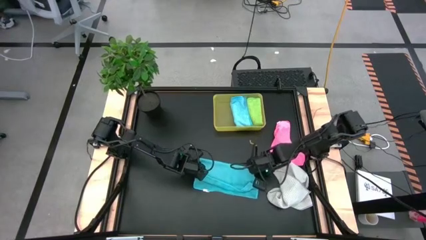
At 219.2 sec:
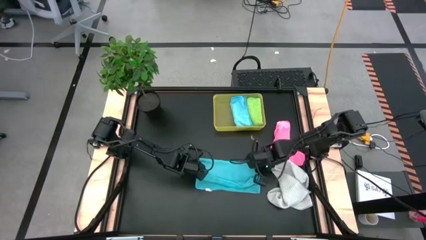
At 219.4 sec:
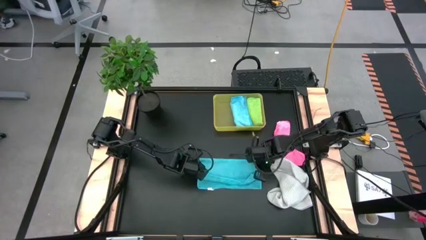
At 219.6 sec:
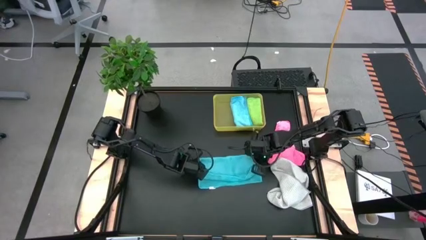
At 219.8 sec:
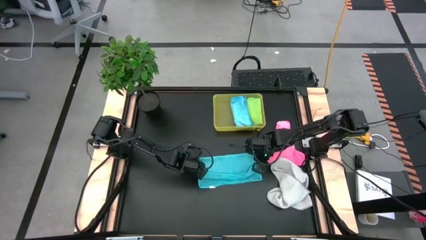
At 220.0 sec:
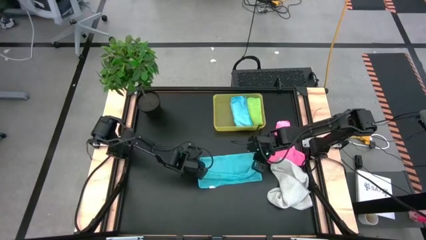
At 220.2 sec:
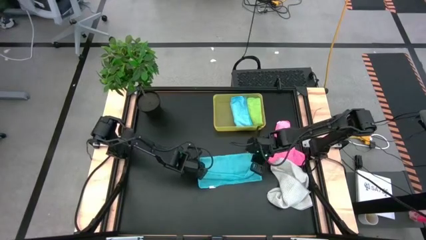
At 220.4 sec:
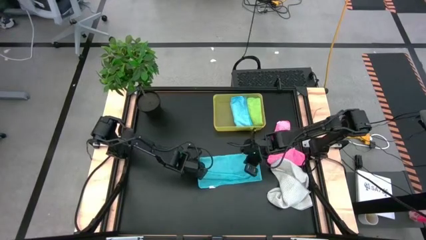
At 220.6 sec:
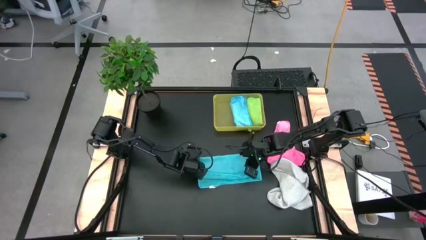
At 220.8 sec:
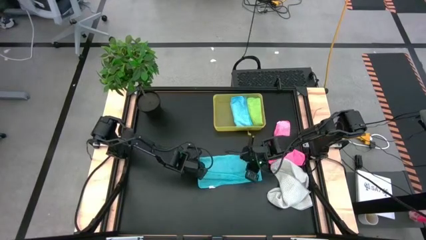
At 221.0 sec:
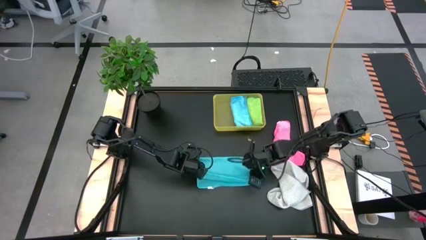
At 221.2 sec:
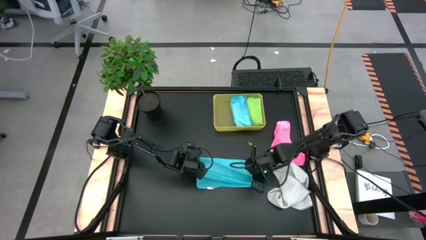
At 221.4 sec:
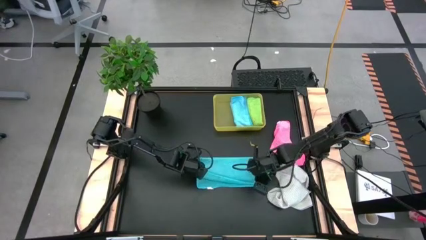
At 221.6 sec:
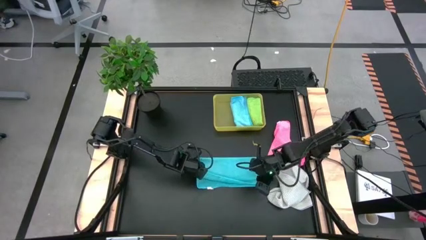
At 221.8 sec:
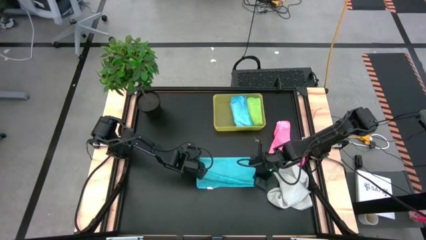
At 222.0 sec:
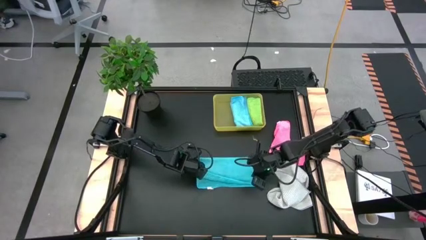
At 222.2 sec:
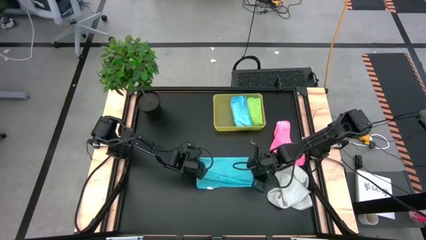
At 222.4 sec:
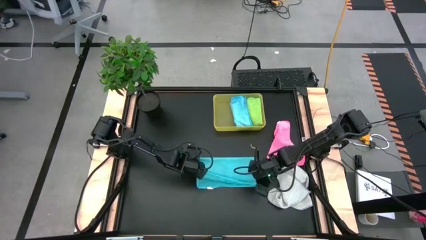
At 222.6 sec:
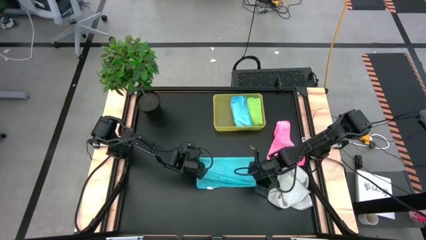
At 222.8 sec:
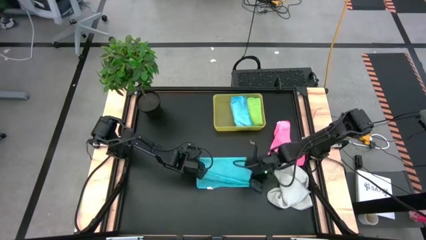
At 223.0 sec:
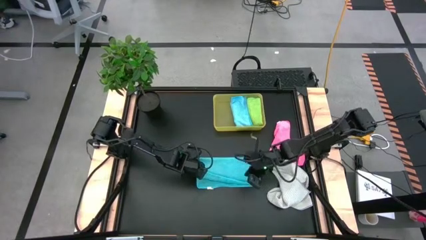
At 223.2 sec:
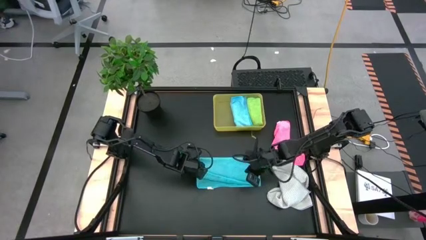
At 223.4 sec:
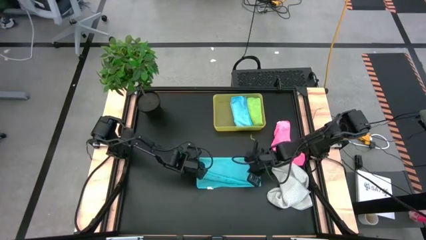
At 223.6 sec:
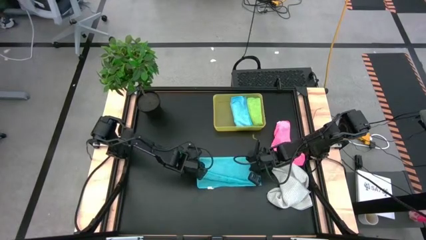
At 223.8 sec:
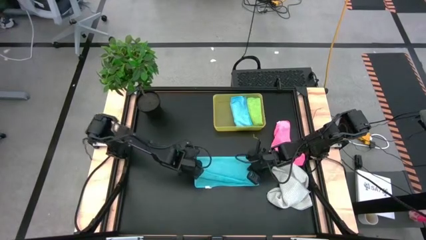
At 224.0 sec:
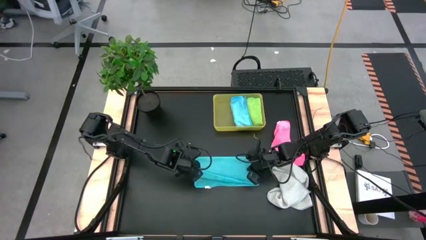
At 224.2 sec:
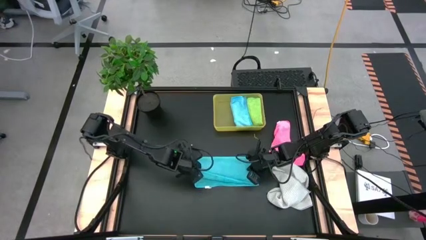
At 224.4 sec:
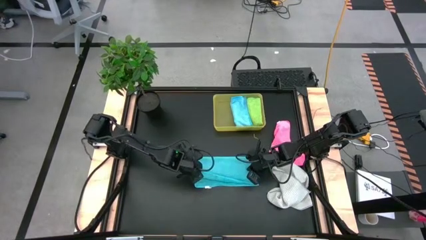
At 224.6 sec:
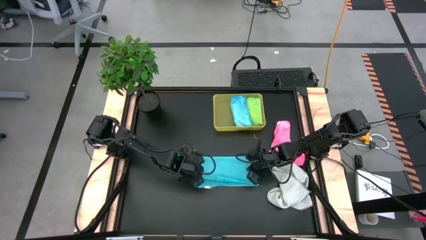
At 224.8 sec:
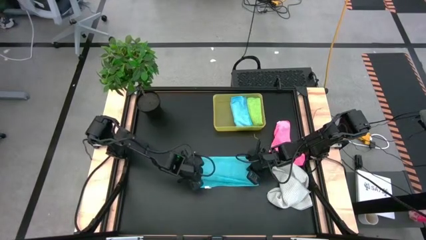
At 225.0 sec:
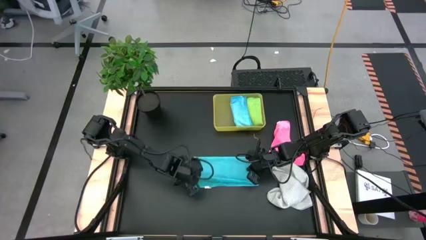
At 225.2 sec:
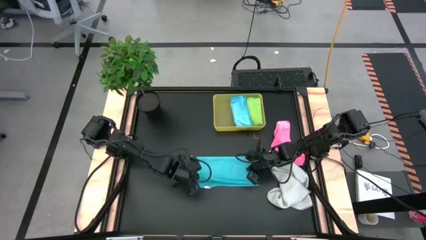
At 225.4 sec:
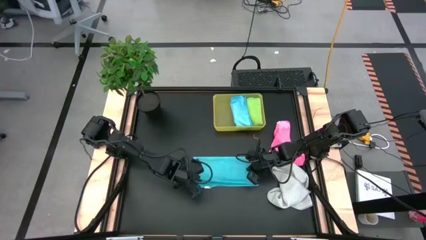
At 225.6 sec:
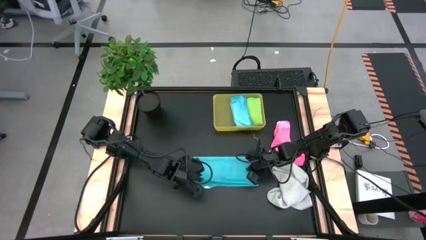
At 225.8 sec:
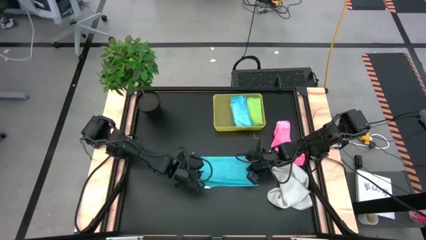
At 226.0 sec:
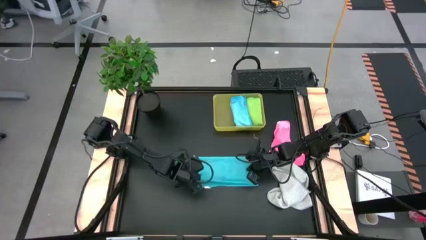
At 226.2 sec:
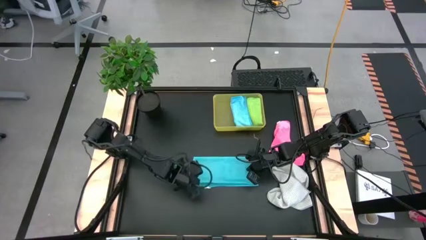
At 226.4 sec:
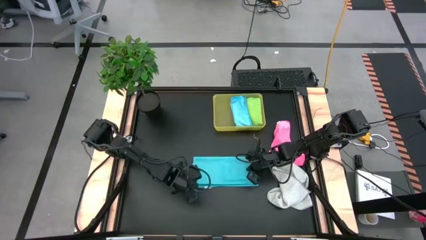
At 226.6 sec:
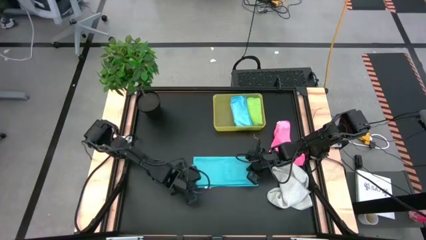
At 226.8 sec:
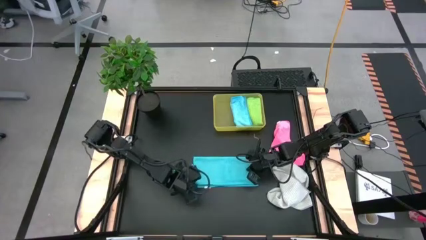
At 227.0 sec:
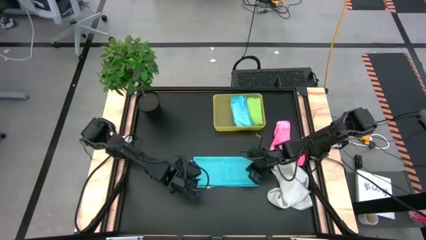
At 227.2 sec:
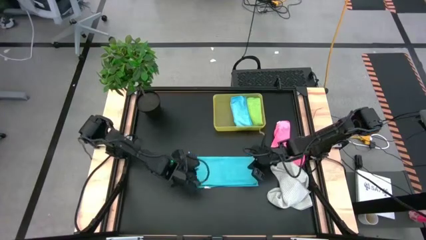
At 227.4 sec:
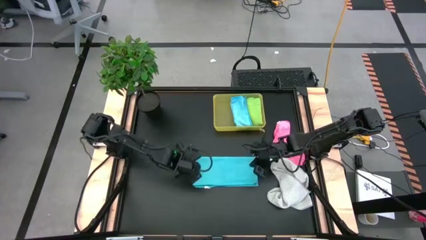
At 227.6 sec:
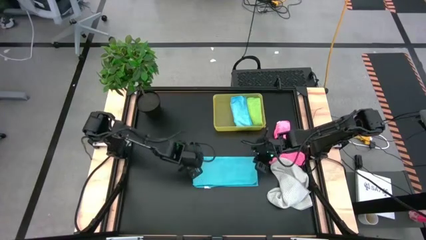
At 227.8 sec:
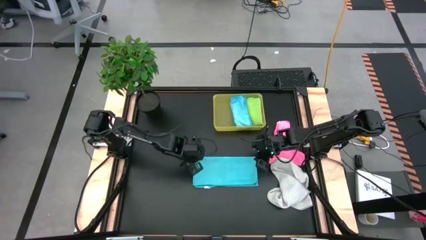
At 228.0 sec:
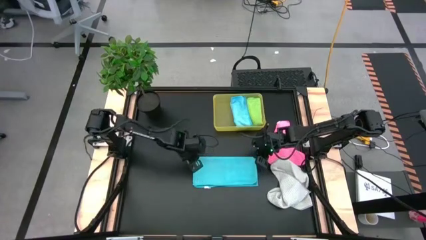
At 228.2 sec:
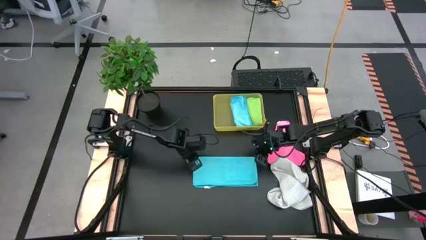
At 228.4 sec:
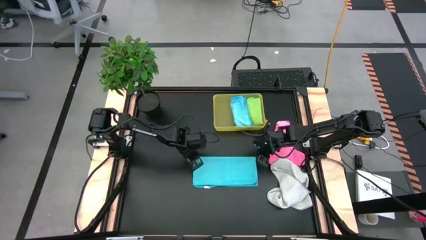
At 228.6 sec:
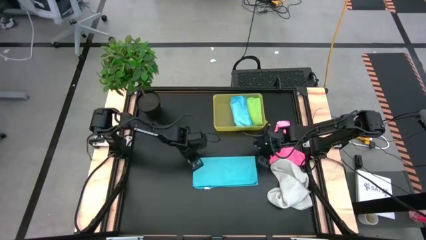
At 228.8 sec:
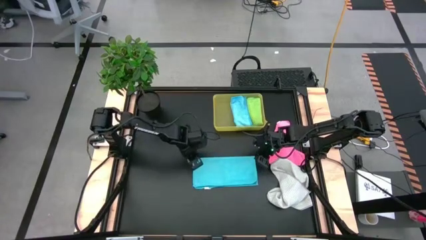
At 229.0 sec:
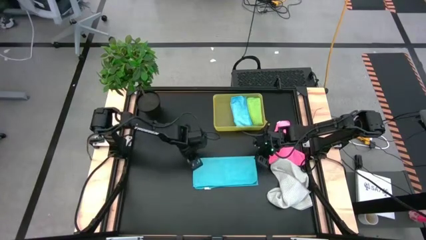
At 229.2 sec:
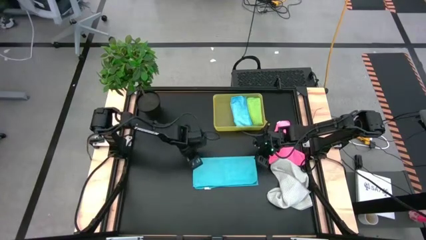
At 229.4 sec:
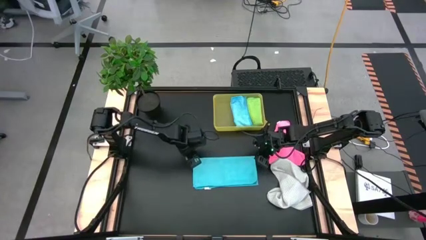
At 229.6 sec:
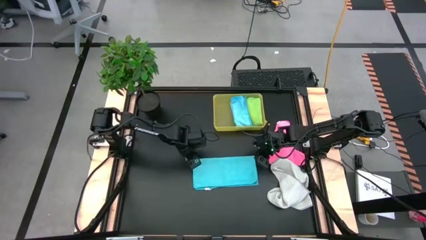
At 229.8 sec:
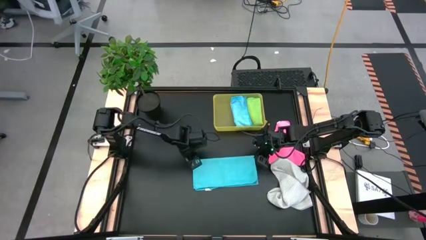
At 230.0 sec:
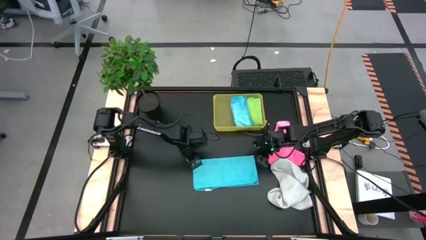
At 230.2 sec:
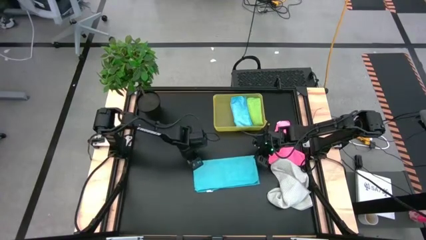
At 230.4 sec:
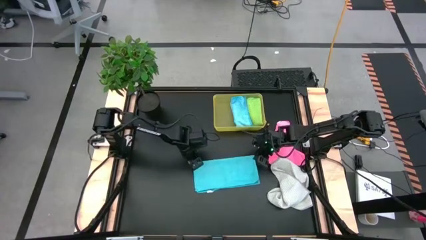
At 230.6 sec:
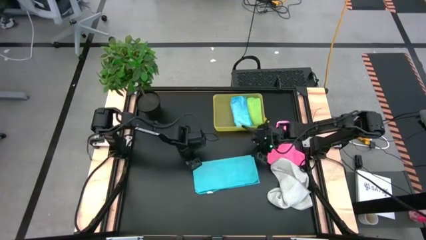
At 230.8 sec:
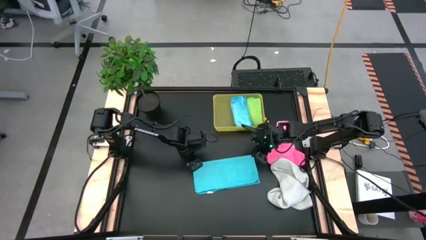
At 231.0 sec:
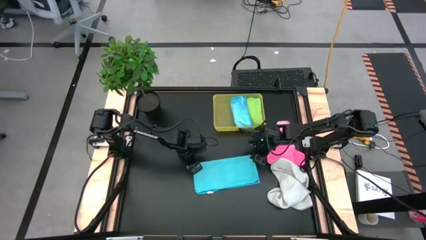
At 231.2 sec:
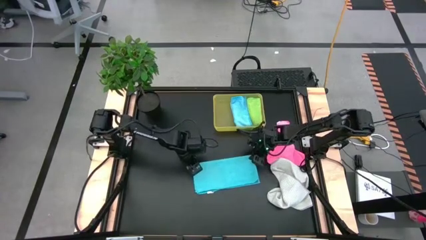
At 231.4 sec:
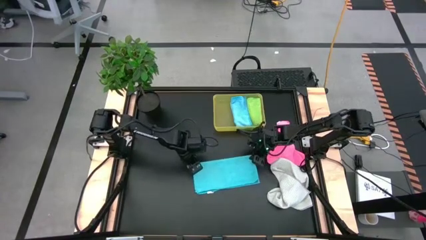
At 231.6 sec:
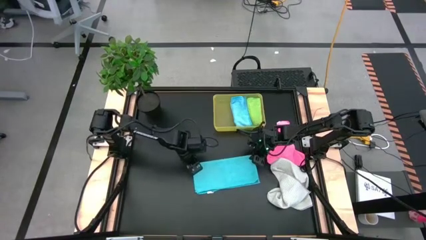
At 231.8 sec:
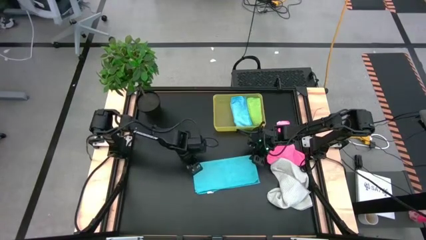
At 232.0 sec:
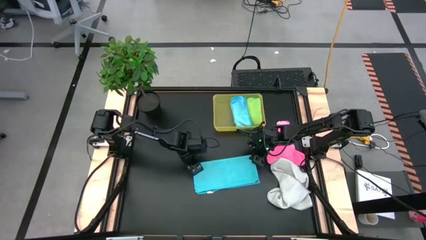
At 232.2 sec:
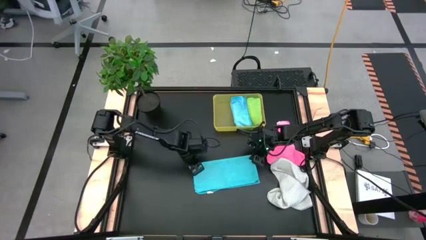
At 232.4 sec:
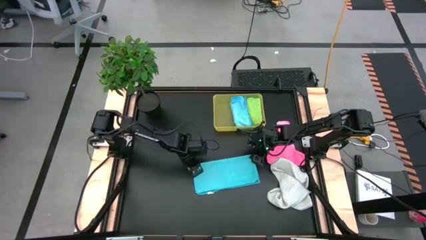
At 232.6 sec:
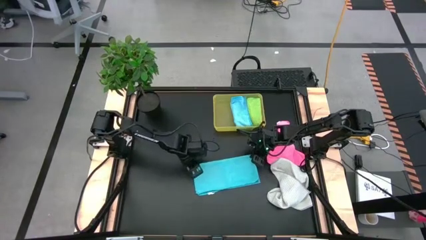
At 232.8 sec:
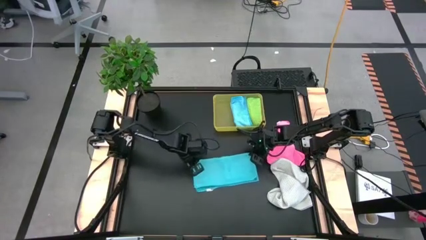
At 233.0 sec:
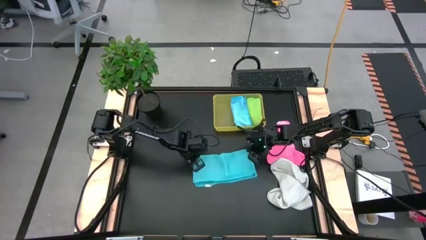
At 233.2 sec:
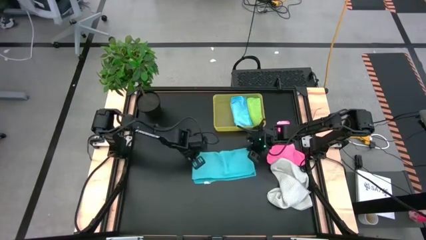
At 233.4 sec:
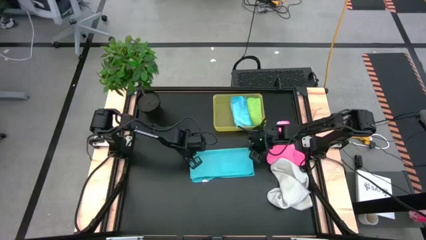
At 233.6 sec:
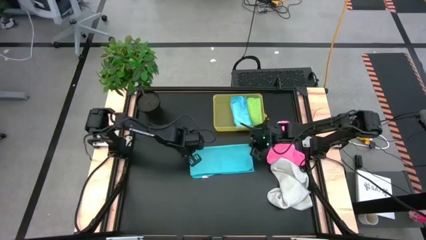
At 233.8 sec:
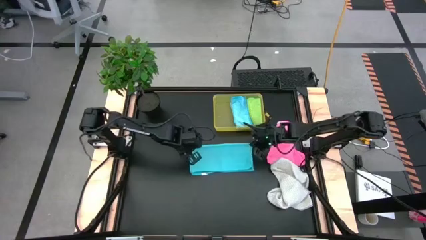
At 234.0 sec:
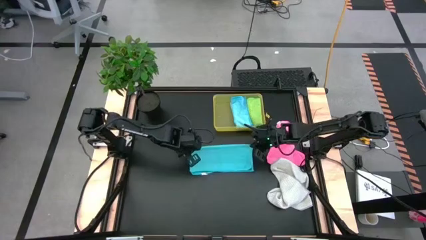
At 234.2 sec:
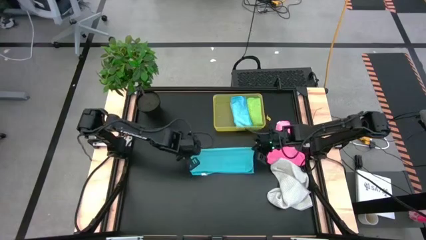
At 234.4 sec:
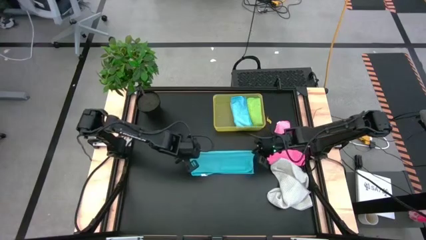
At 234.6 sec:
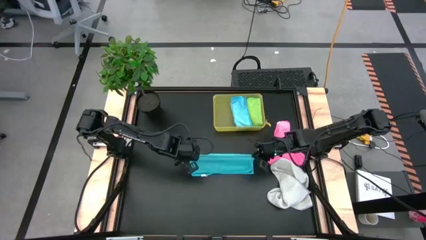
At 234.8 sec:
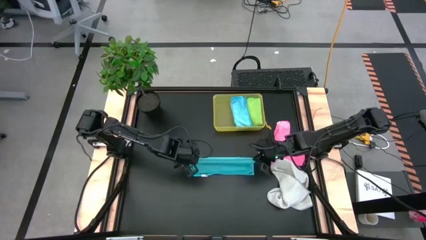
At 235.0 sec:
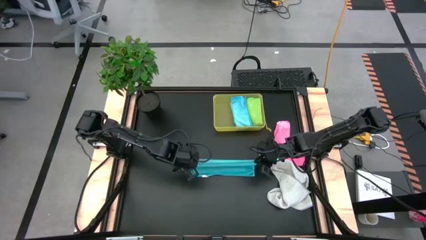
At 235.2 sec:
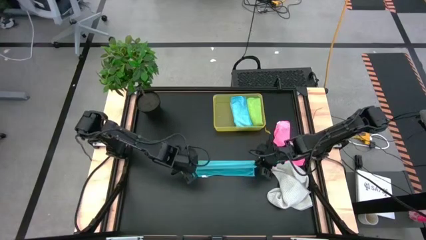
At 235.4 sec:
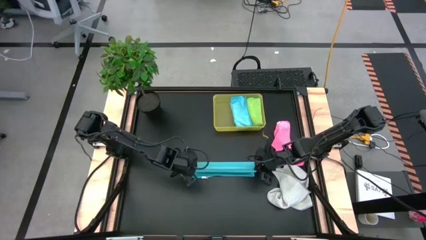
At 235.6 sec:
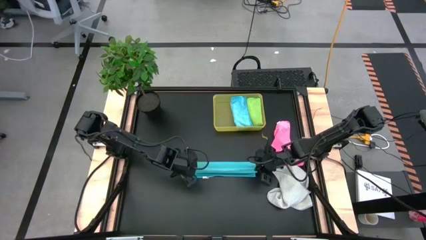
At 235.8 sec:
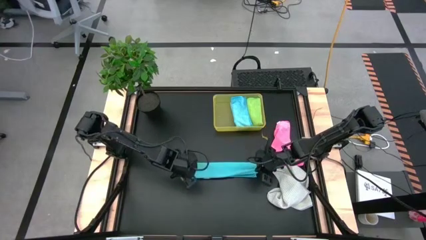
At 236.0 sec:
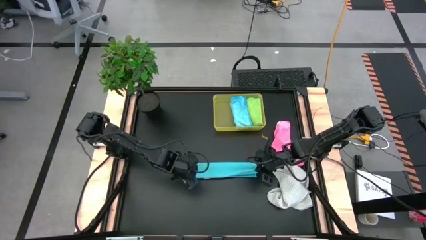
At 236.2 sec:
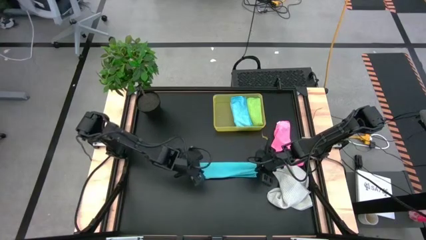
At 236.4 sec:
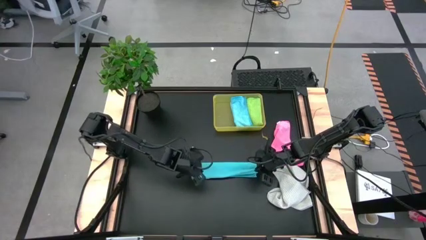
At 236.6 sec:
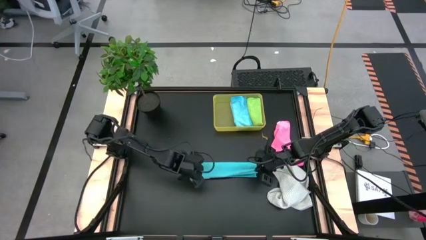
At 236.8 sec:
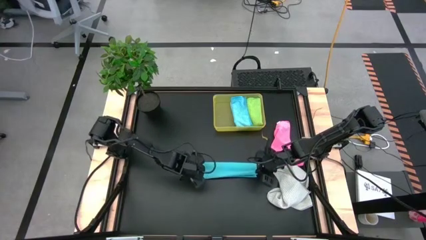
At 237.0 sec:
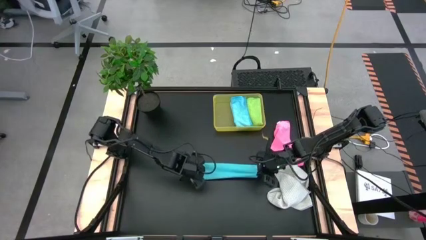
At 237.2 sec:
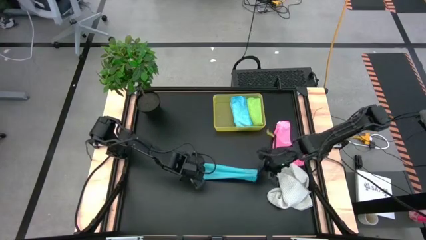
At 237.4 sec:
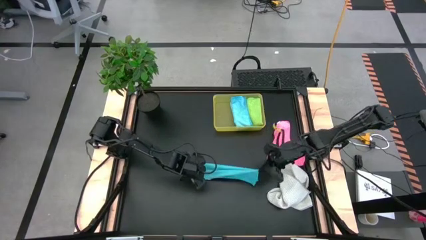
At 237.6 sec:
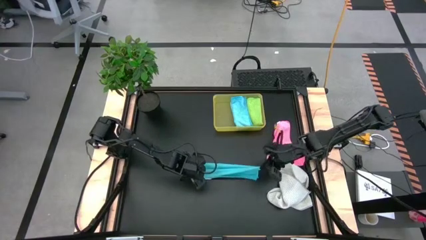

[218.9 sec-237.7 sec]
Task: Fold microfiber towels
Fold the blue microfiber cloth
